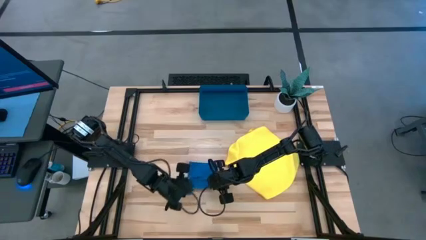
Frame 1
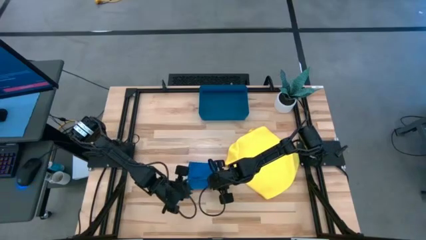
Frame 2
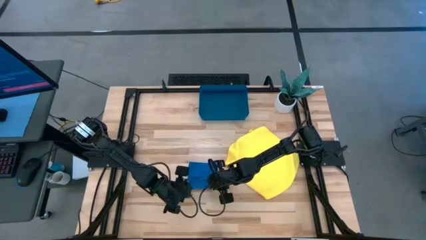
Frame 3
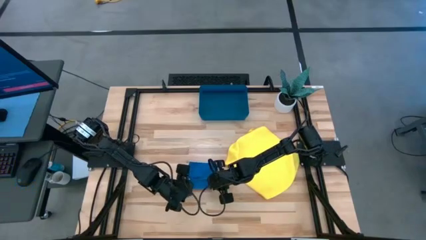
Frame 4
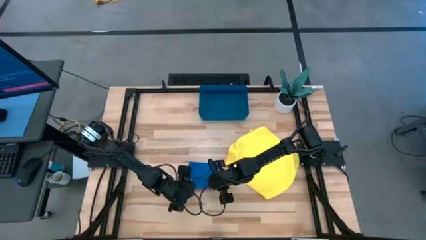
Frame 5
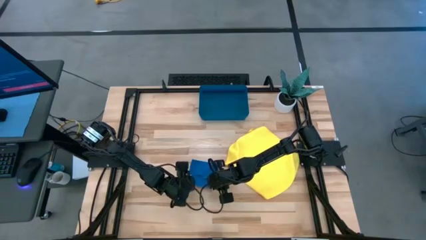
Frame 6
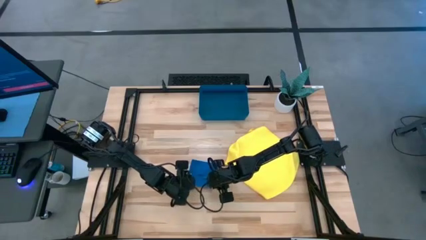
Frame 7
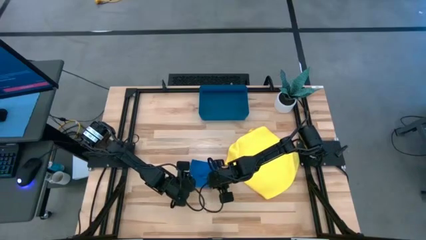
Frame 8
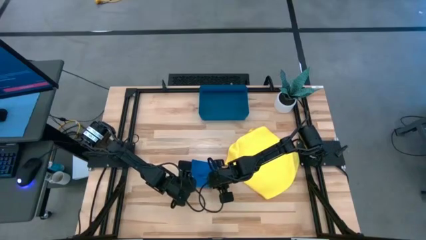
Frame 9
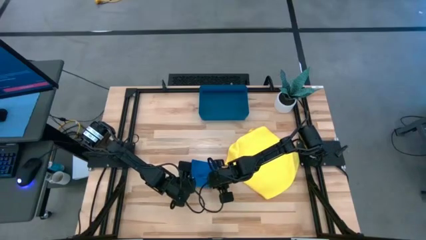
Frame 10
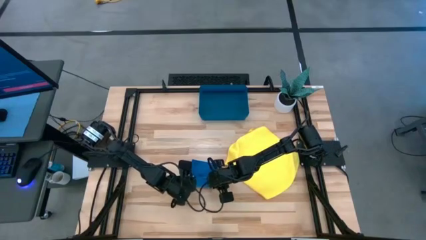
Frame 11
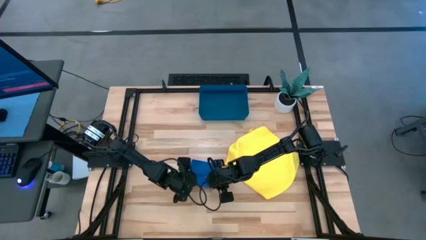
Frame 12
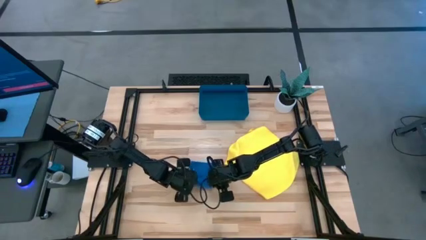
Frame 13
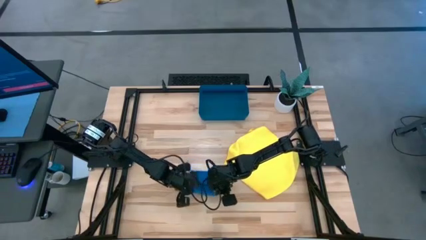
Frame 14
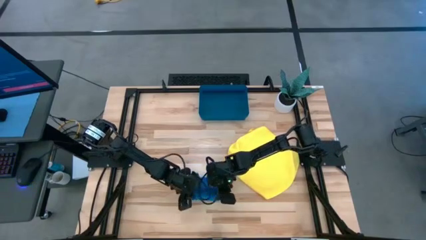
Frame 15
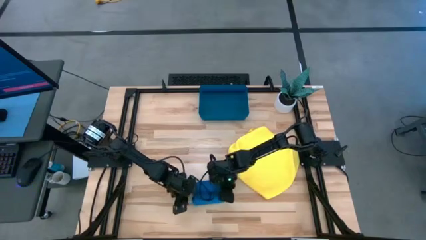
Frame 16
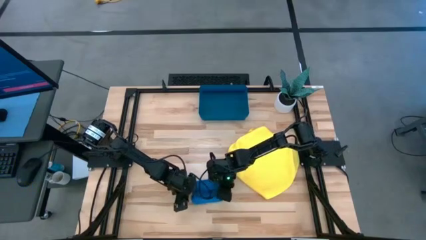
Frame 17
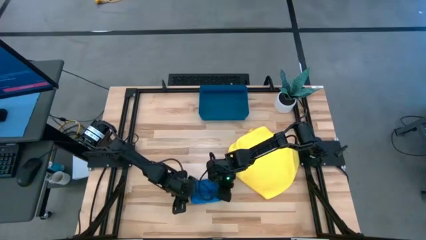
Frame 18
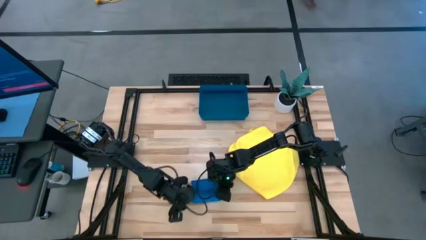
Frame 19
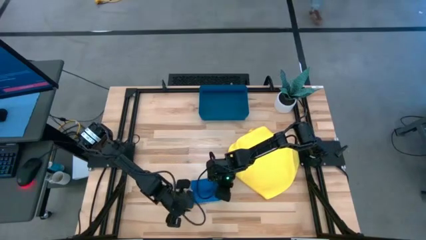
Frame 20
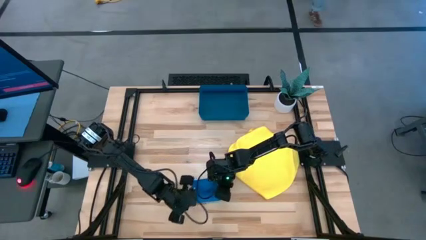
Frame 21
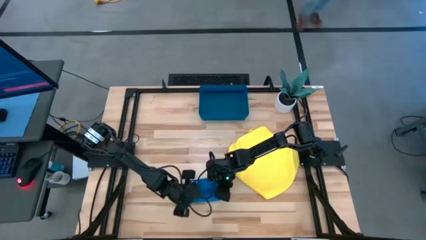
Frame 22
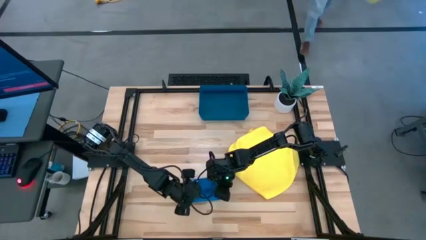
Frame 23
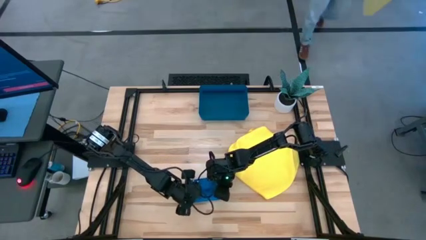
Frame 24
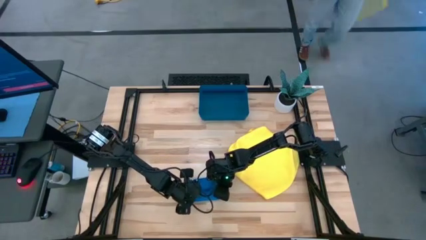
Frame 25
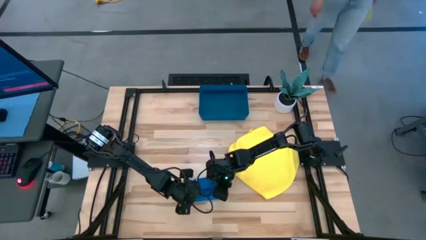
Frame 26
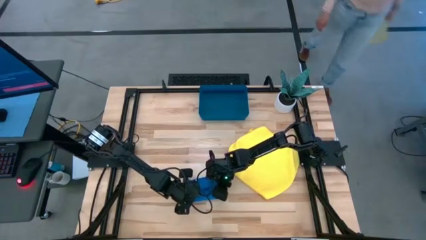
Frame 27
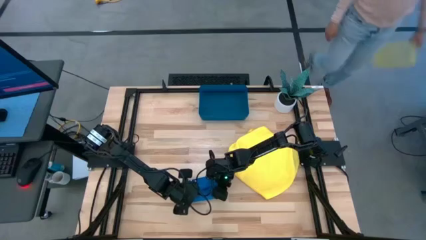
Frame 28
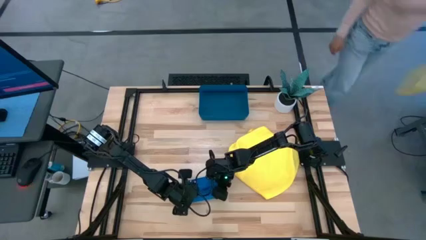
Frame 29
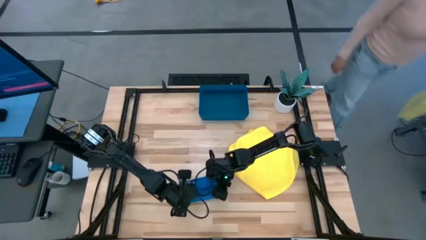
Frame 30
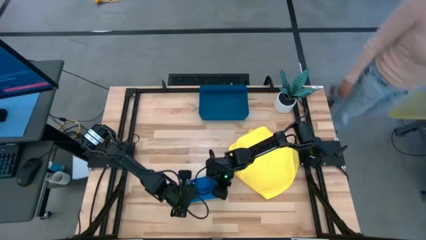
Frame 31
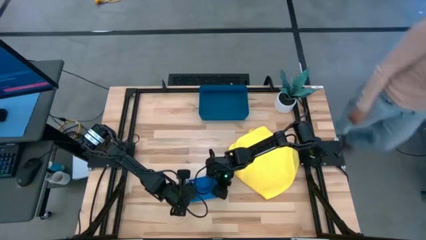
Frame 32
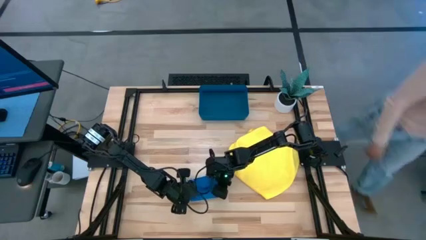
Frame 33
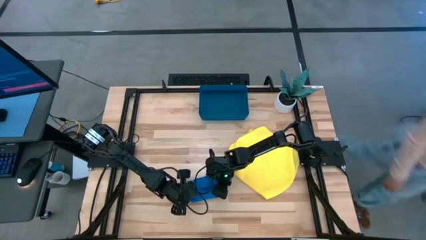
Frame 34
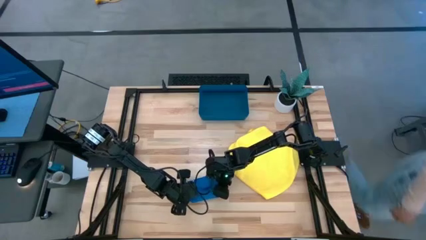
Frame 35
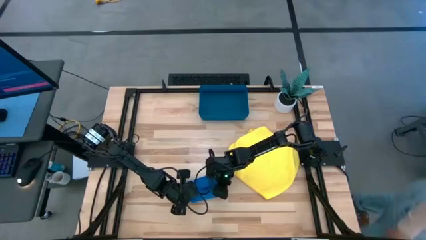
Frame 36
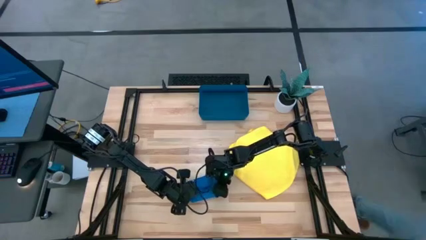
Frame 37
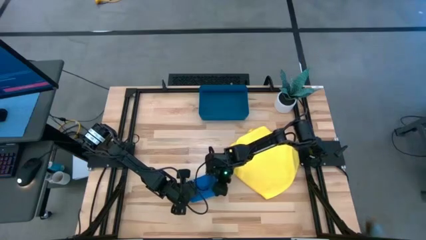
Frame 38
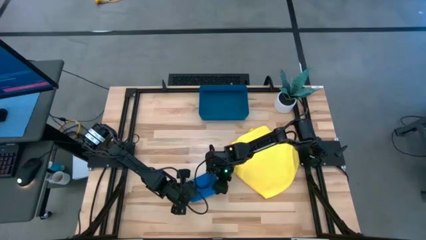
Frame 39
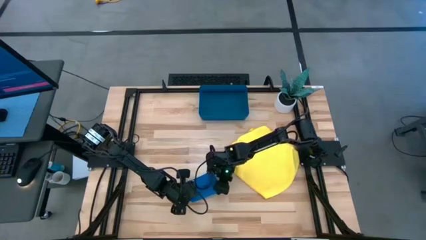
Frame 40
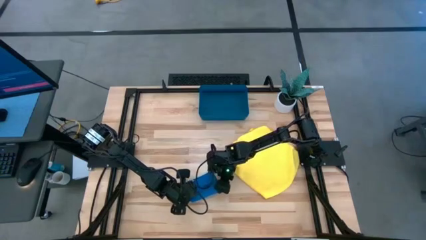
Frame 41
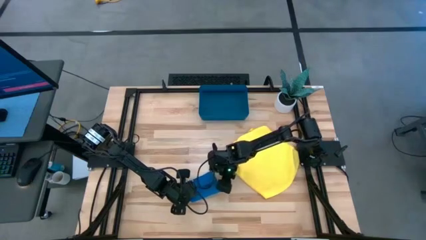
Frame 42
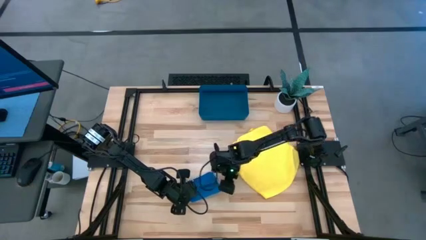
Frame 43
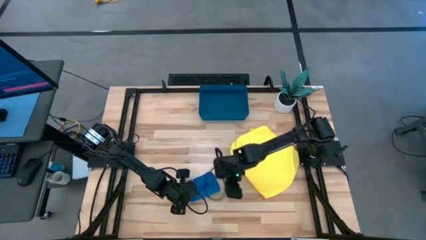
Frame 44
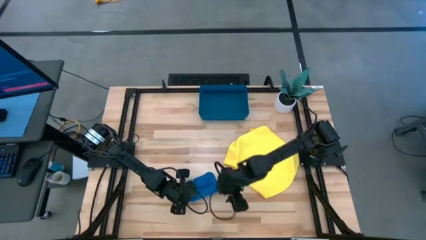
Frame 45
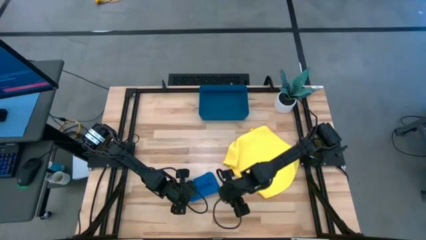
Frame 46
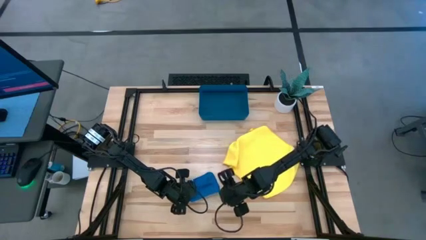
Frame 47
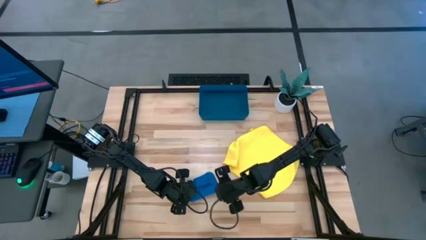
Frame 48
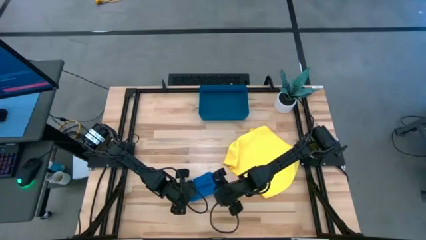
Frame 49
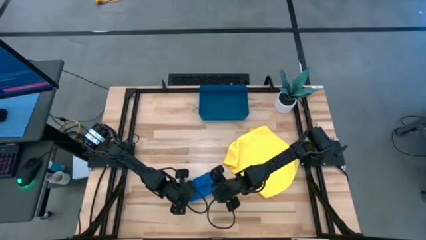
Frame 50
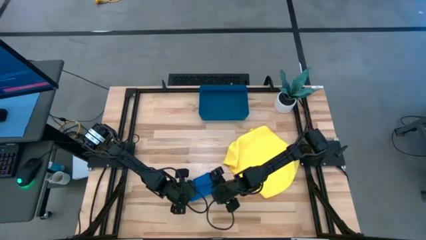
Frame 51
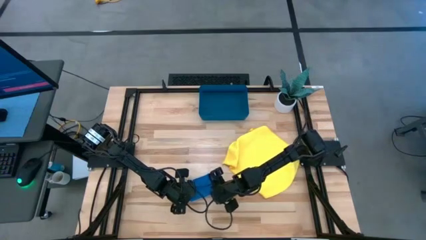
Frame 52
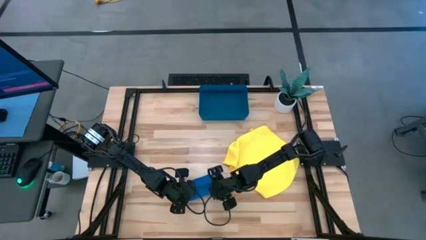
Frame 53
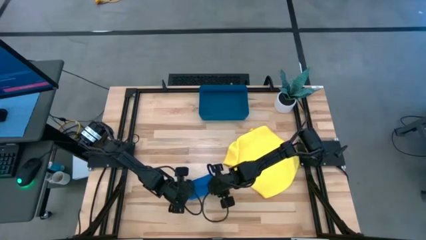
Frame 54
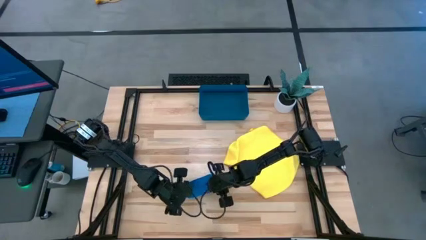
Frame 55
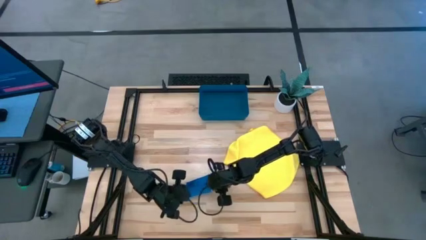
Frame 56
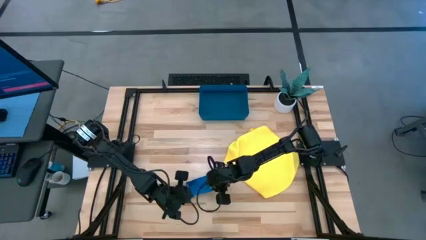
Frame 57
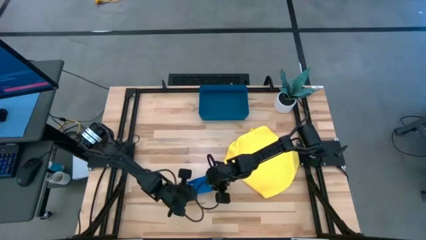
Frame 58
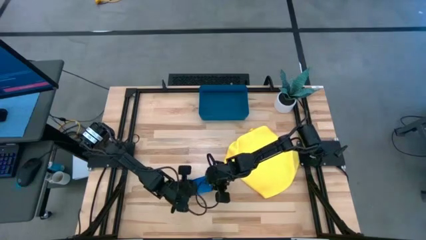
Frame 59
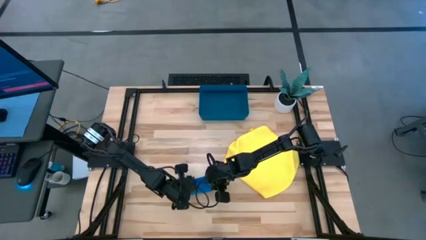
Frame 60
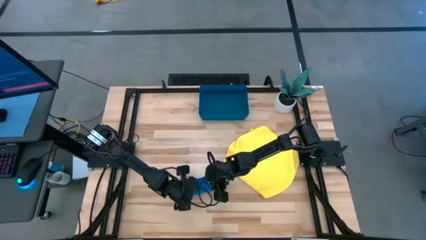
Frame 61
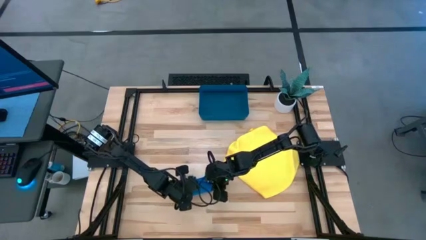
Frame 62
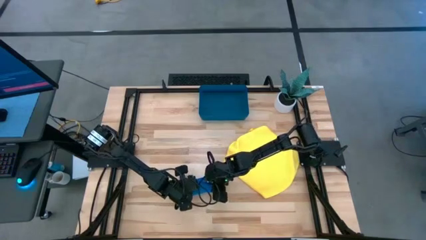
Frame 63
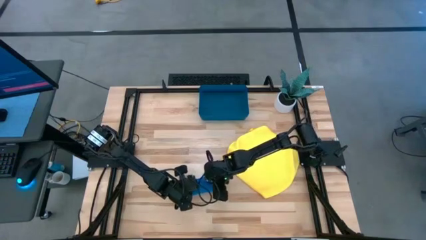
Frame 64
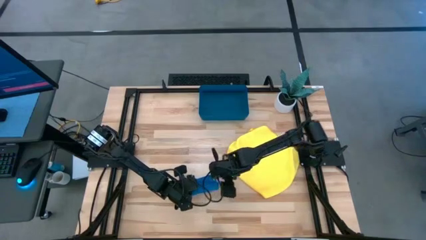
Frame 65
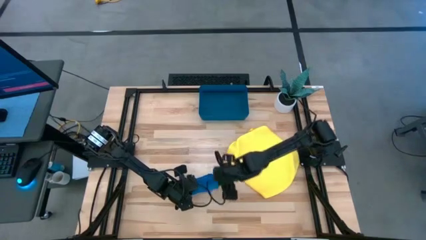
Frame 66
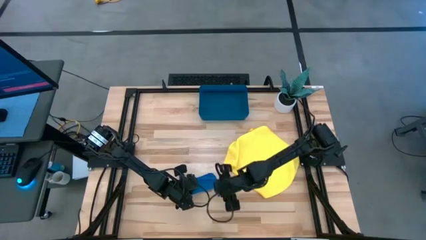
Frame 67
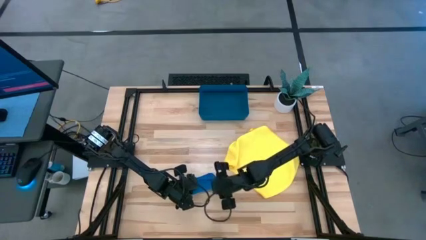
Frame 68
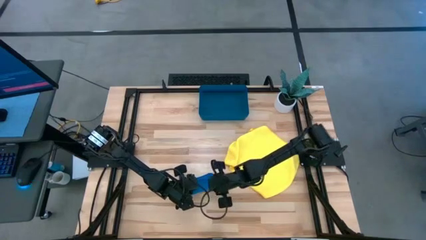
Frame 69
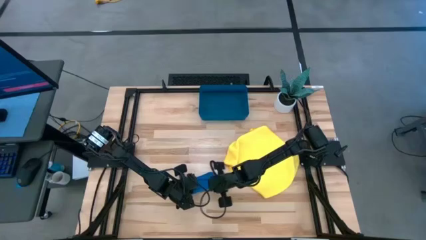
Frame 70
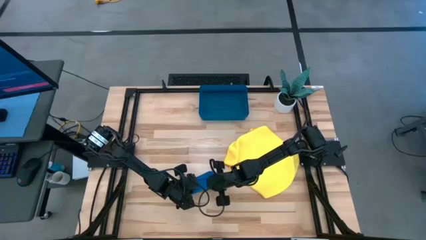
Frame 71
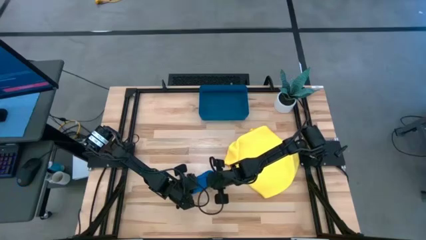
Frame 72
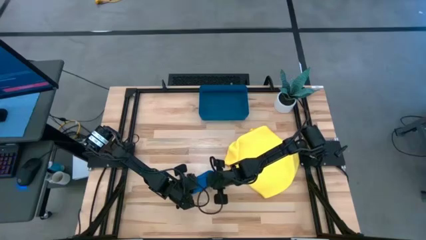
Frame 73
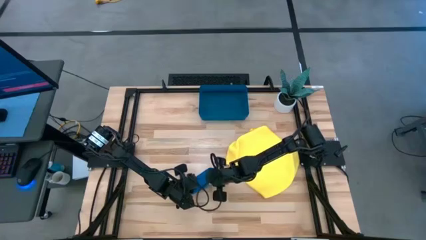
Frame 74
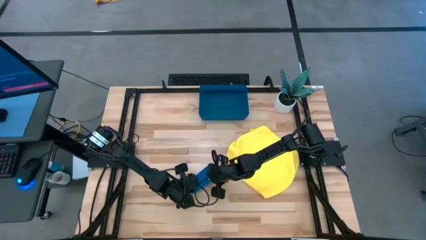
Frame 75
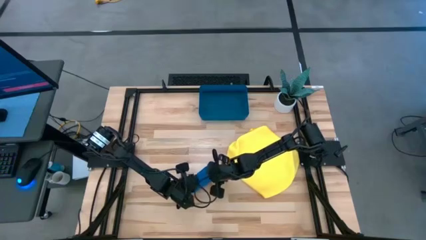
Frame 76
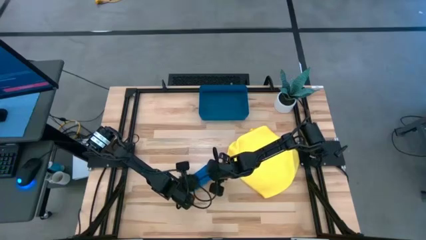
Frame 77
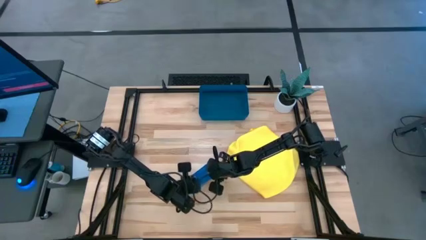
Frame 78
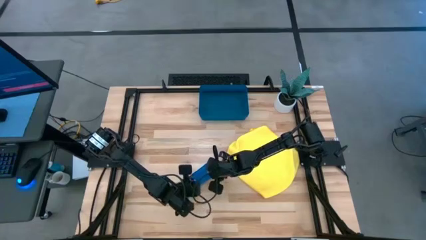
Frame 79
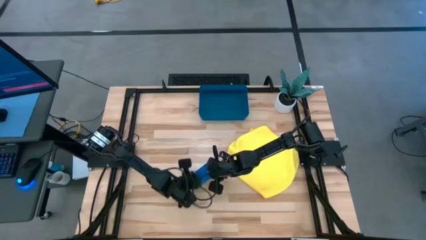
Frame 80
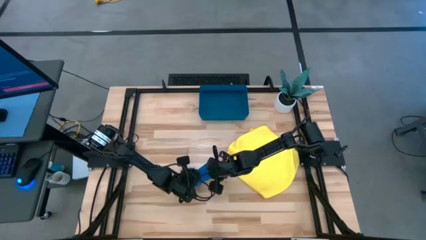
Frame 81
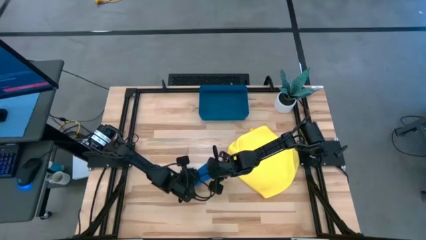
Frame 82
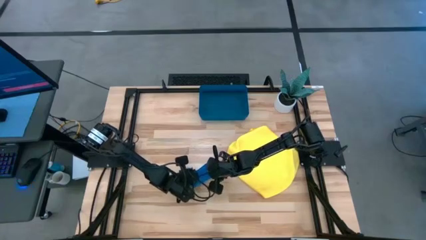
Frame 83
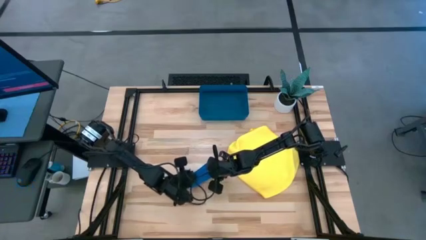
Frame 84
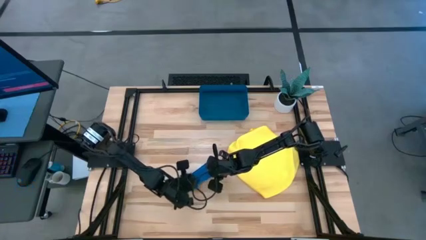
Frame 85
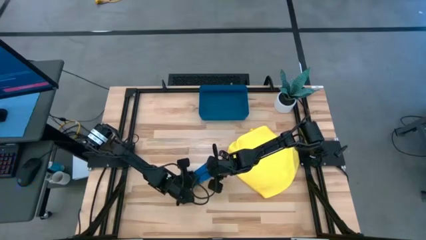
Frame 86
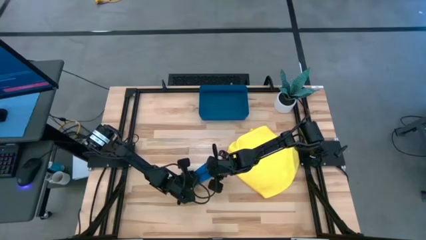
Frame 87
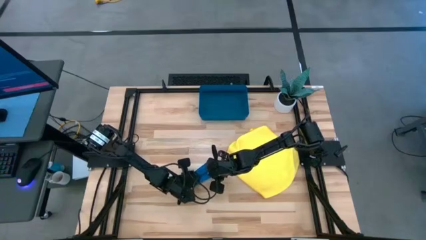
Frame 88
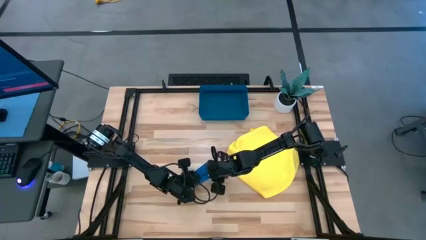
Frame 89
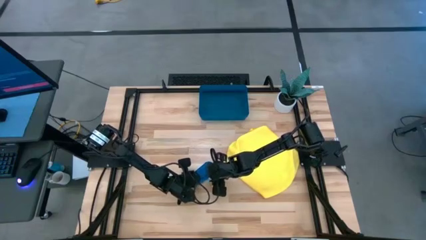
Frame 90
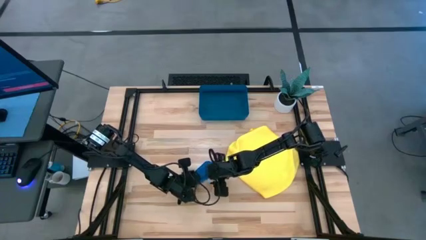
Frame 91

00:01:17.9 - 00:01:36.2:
Task: Roll microfiber towels into tight, uniform cylinder then place into a basket
Roll the blue microfiber cloth
